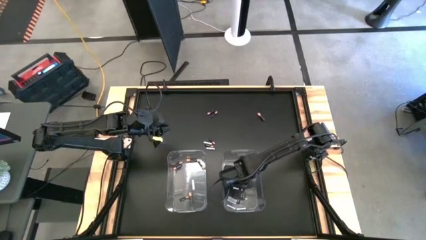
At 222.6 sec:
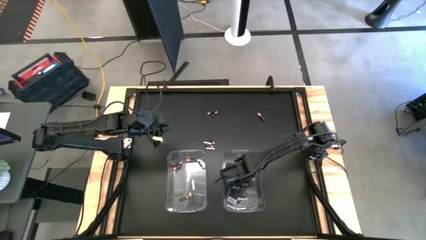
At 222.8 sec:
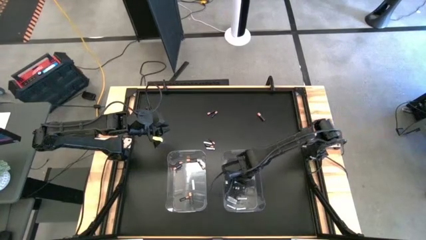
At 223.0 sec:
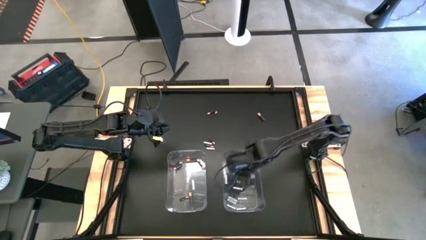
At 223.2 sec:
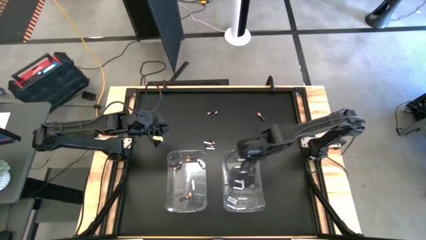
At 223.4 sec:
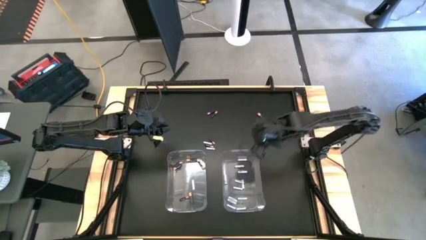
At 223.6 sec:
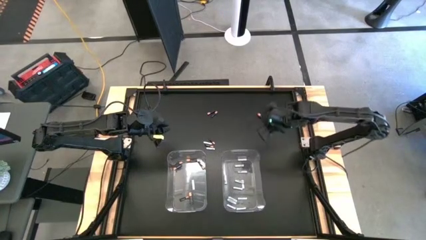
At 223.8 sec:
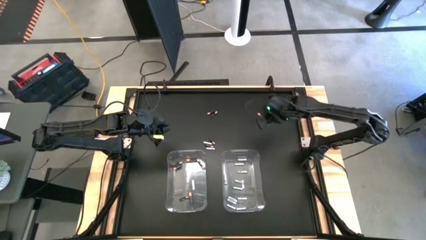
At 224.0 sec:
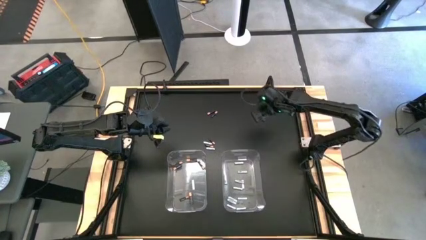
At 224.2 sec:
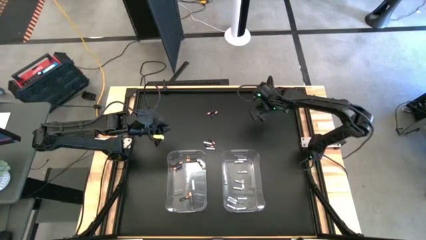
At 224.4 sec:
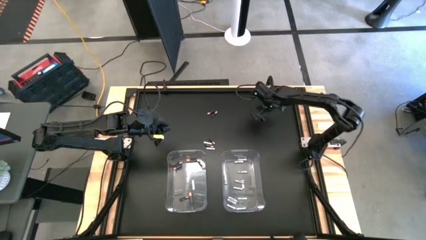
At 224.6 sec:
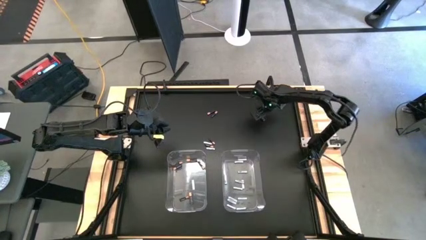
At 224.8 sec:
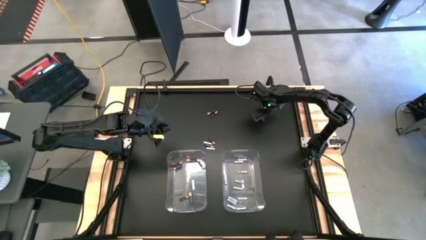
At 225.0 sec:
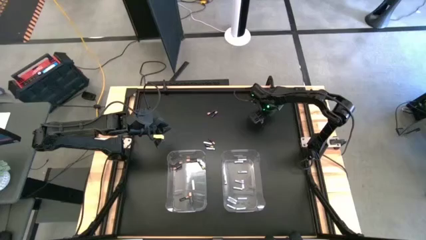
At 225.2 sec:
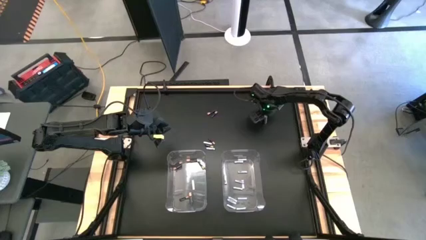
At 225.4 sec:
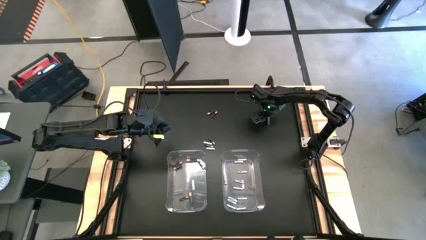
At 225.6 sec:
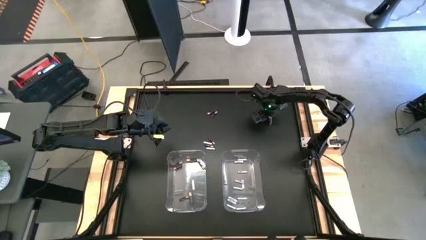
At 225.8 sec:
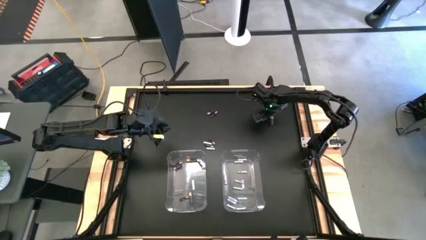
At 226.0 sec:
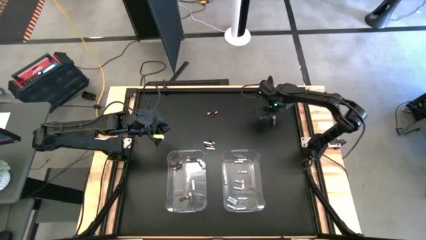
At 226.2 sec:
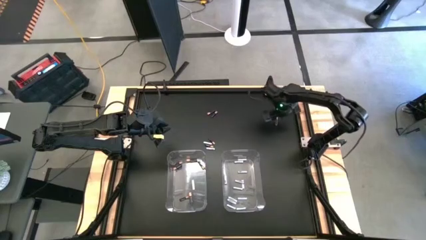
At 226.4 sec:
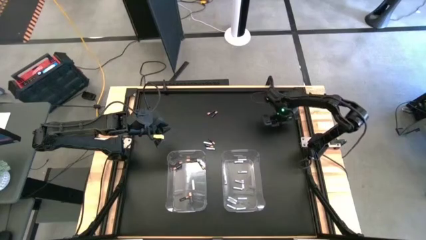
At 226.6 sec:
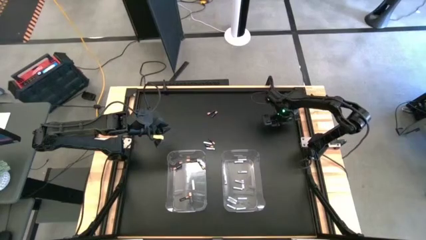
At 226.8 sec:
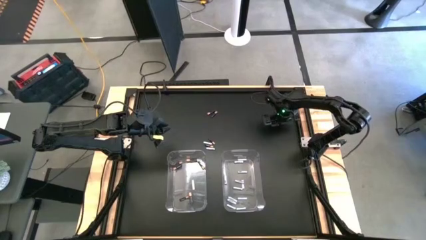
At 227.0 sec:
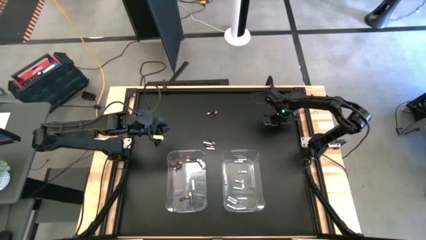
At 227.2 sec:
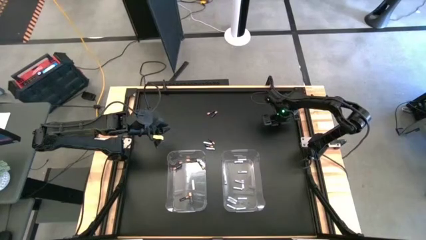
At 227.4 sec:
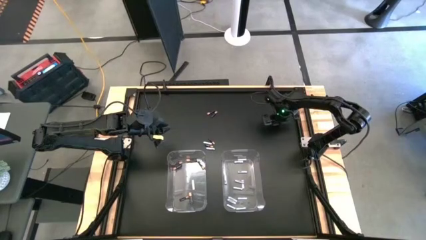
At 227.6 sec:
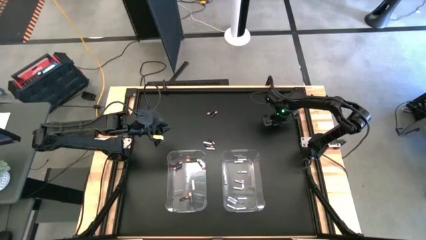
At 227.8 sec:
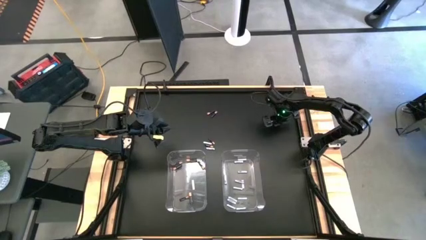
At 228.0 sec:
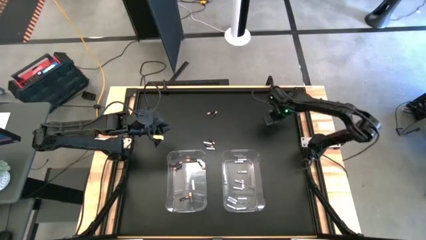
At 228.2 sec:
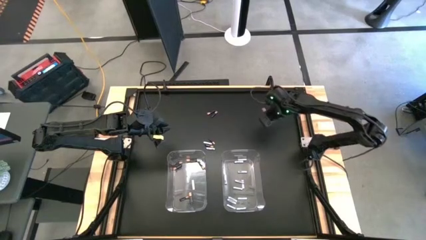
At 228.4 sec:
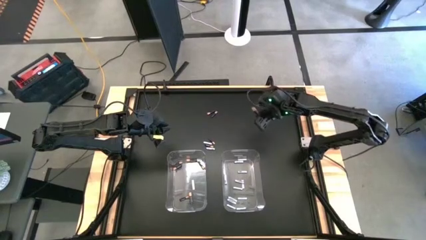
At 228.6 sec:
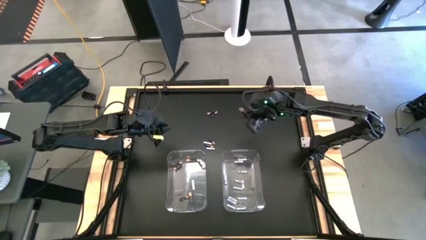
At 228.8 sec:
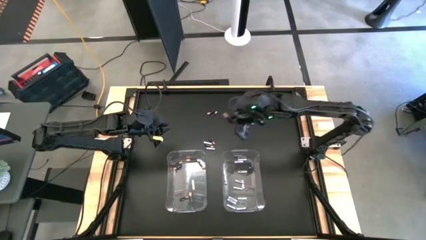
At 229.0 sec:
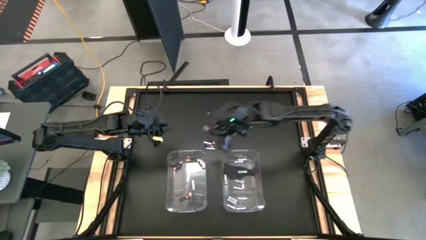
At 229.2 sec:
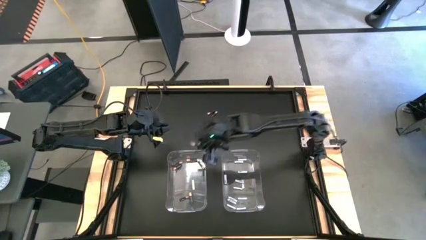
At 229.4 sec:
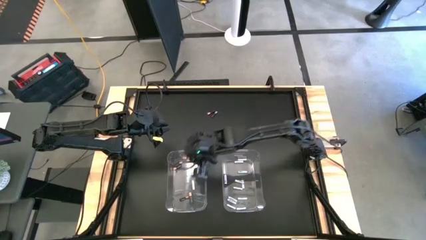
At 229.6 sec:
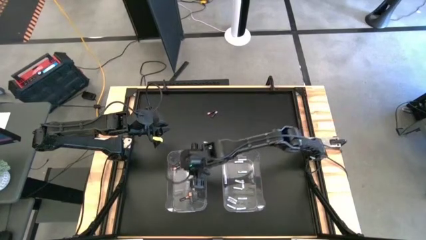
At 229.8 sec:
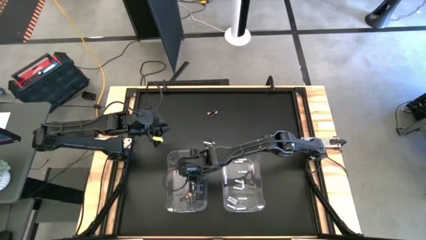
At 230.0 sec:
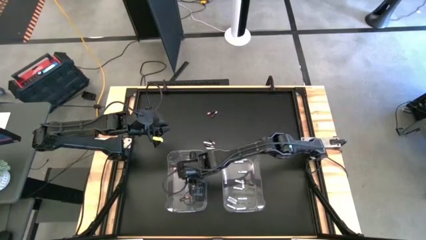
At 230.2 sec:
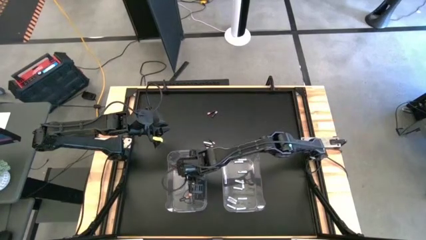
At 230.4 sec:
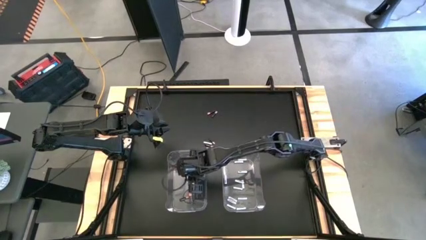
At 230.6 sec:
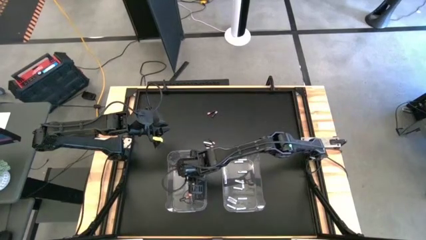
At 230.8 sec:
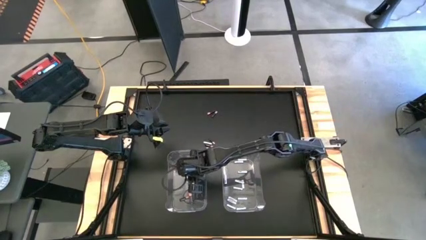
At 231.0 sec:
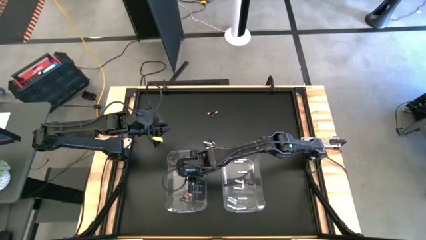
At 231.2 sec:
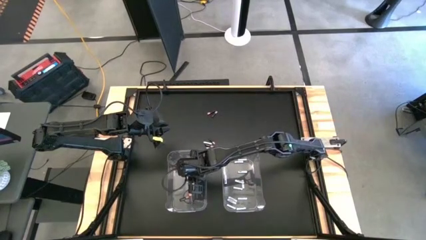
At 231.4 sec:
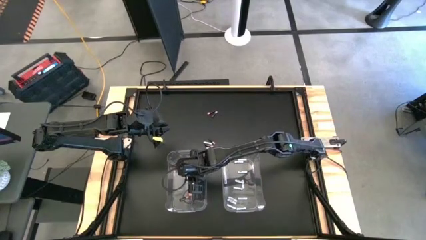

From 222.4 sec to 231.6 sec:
Task: Sort batteries
Put the black battery into the left transparent bin

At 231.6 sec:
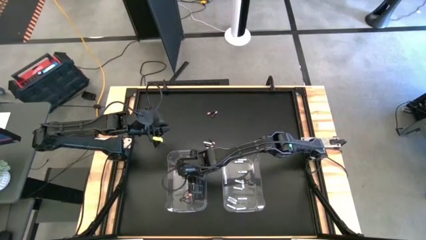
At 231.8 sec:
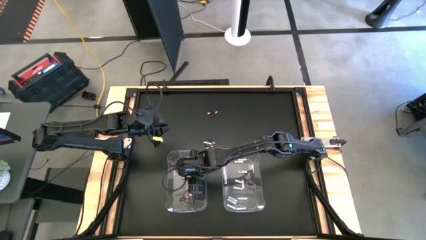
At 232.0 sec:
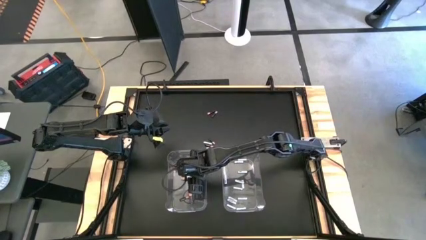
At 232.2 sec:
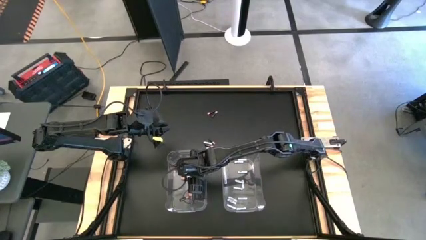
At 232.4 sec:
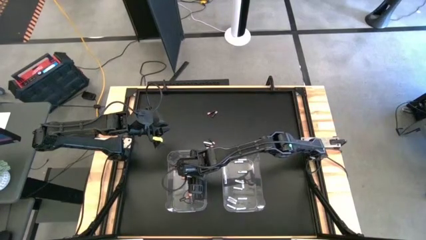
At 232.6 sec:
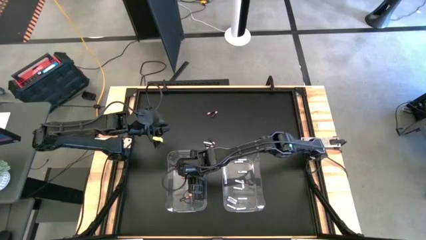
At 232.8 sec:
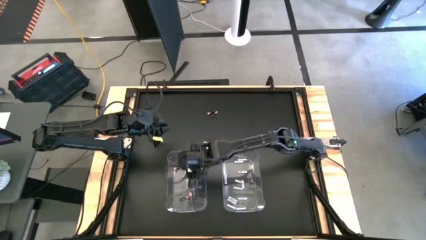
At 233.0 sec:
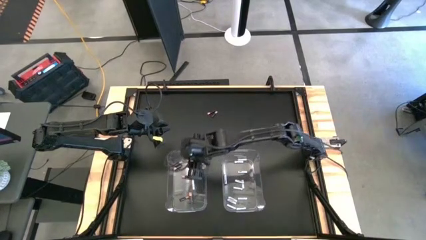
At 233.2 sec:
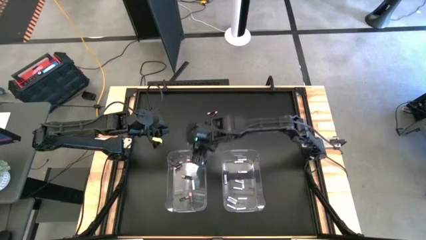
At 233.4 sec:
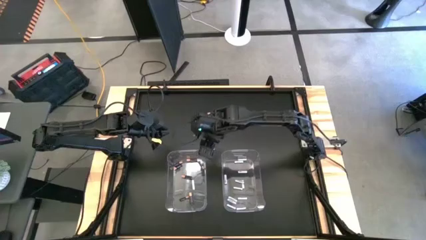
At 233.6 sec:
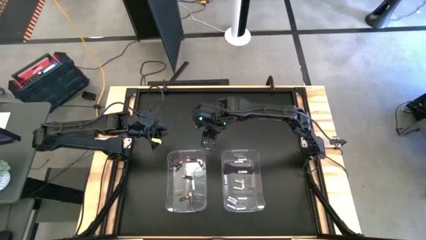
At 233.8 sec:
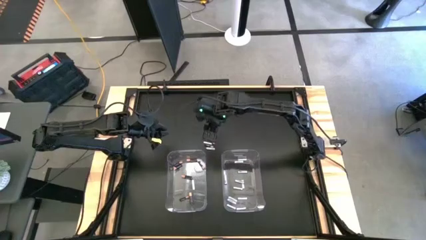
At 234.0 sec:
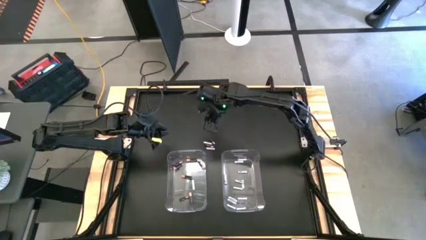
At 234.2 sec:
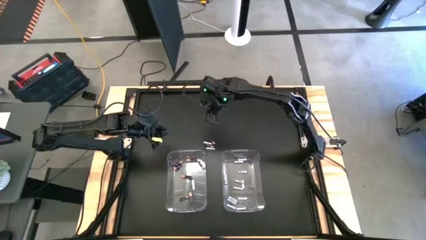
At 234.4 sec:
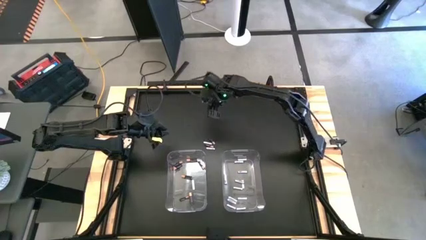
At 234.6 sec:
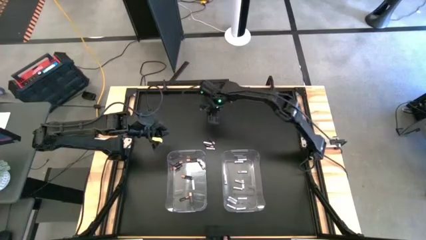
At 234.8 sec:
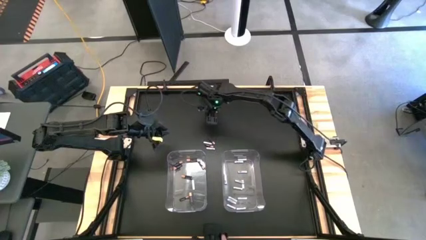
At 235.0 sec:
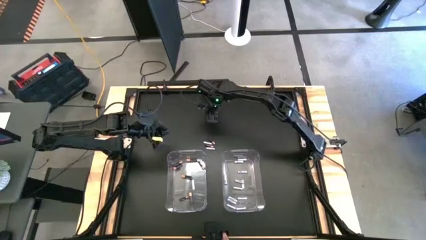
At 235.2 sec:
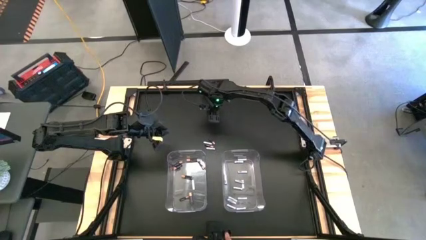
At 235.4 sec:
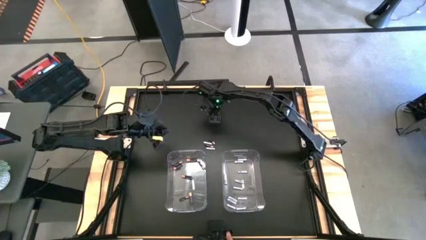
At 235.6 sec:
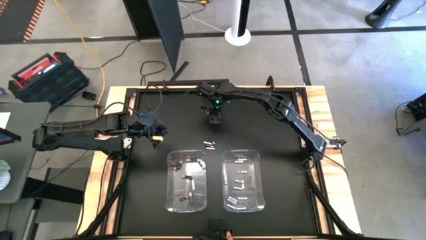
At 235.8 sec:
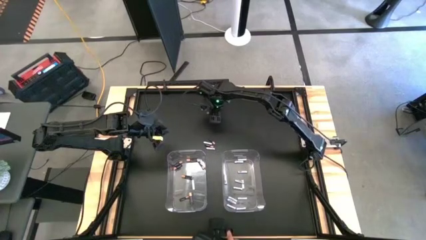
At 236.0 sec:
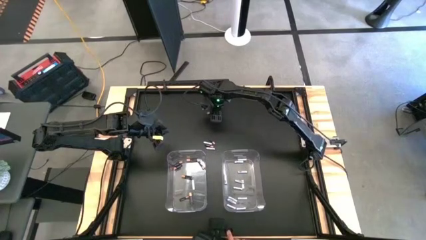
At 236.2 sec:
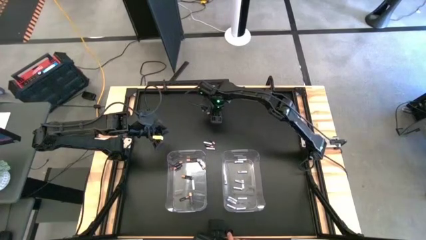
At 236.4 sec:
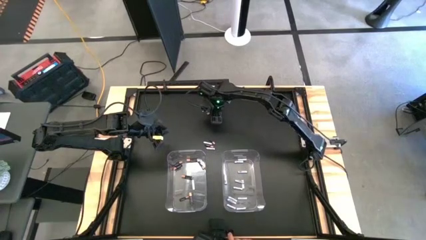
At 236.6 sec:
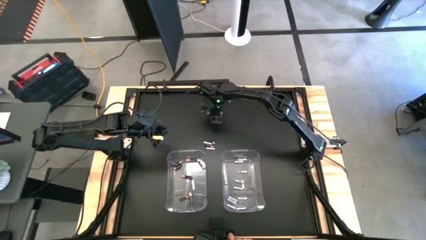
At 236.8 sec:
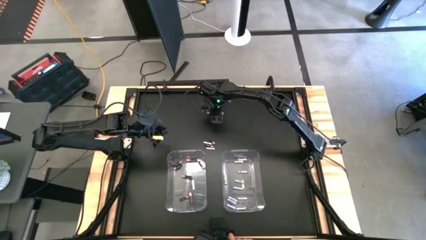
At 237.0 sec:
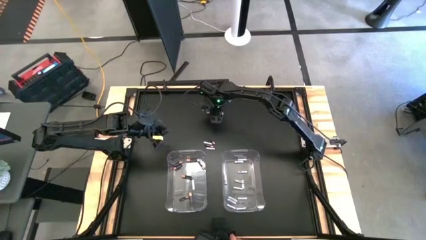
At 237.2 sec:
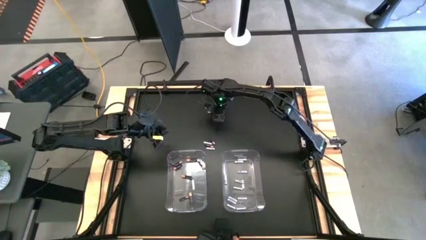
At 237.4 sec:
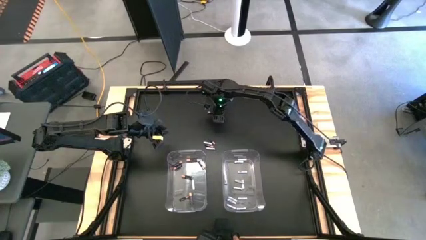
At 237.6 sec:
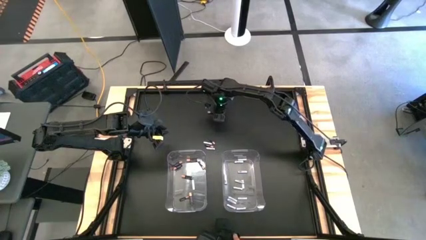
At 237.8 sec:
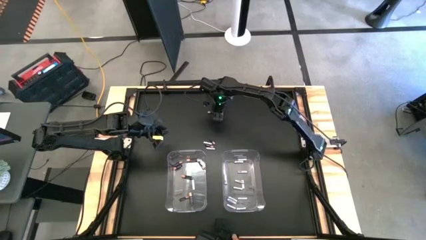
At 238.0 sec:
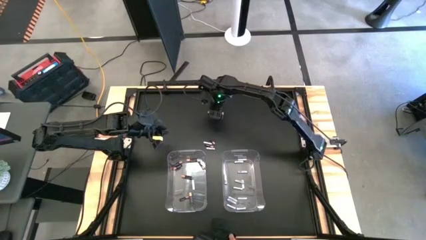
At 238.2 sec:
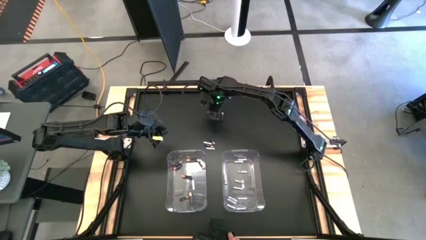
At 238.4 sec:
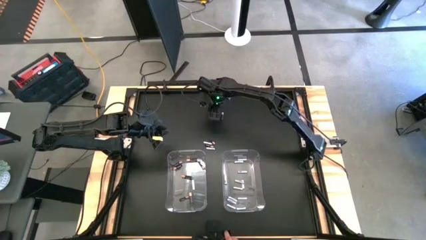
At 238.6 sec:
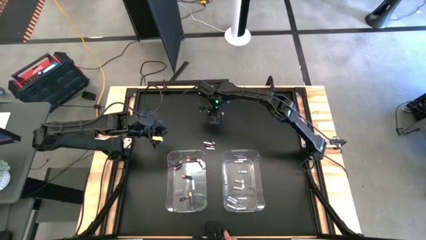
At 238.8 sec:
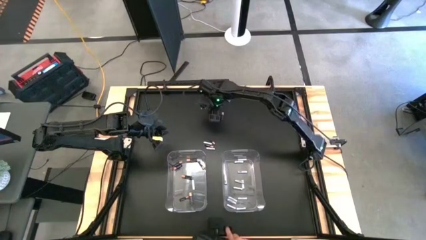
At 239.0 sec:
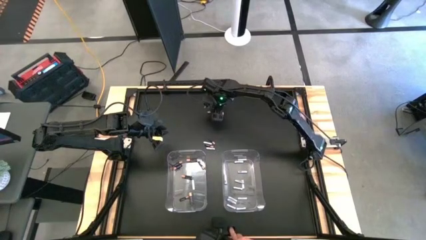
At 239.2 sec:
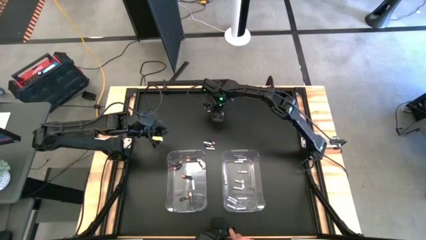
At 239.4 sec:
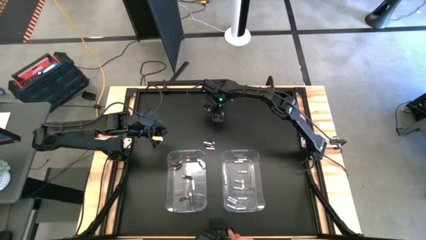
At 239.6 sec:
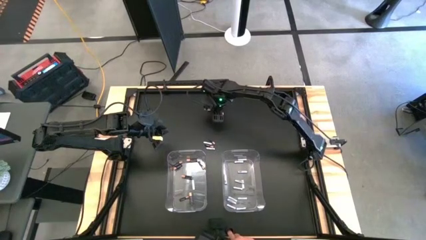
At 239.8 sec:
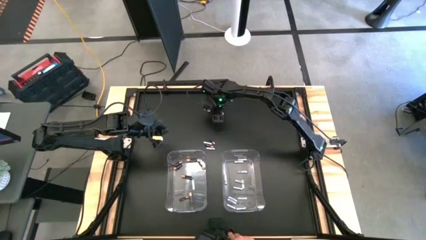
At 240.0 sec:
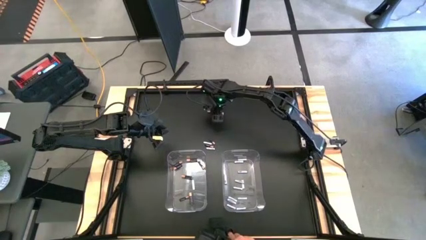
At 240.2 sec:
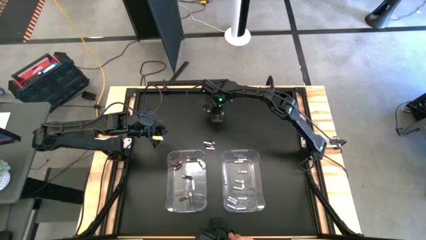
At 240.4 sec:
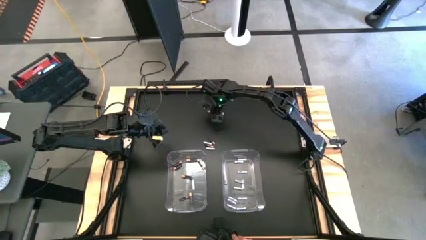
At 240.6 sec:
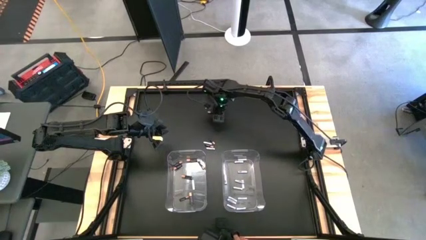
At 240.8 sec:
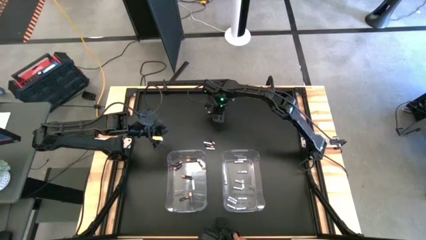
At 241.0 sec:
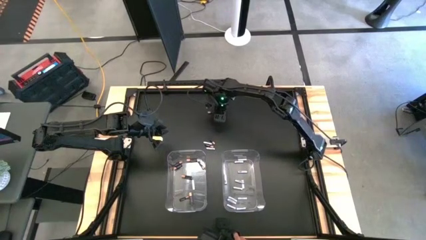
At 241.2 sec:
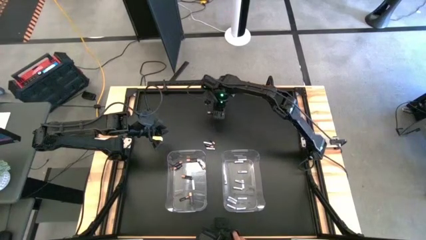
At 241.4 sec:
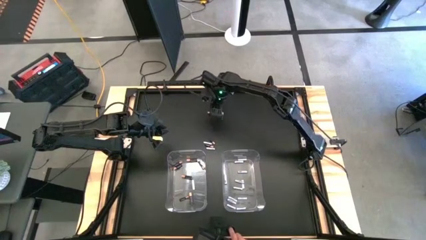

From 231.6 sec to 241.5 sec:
Put the black battery into the left transparent bin
